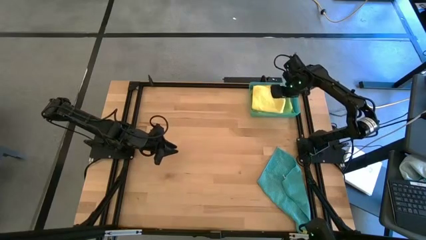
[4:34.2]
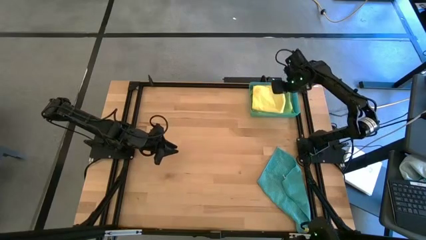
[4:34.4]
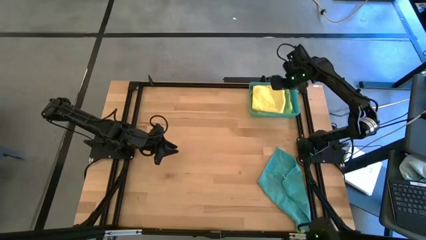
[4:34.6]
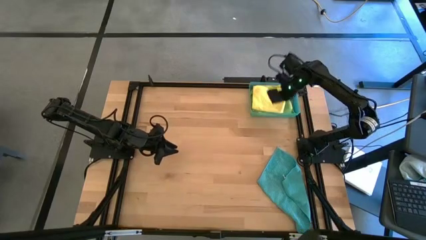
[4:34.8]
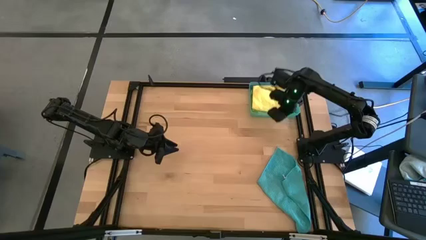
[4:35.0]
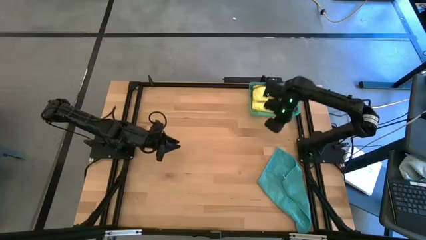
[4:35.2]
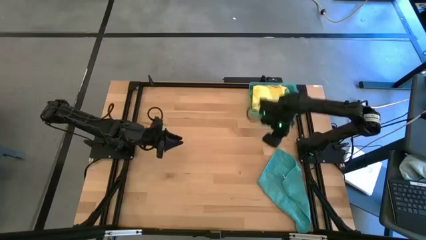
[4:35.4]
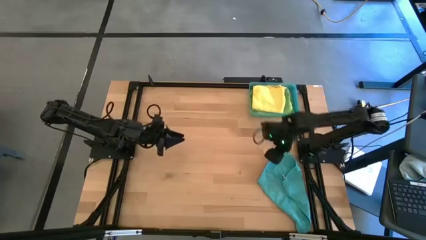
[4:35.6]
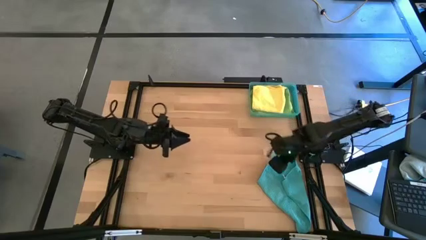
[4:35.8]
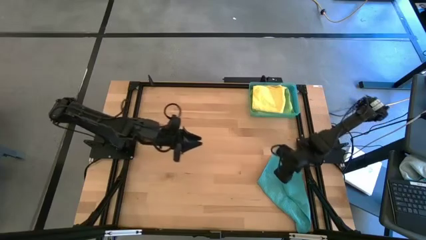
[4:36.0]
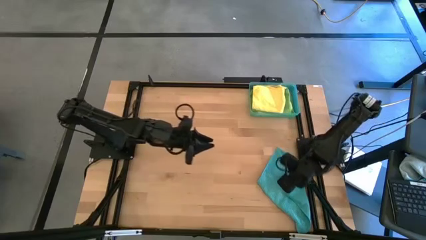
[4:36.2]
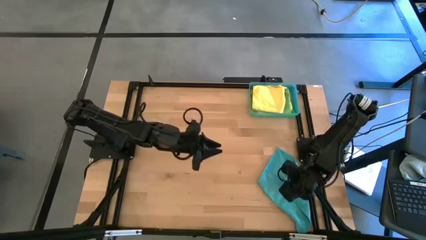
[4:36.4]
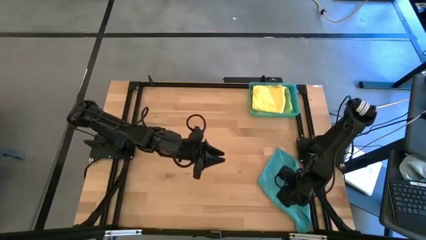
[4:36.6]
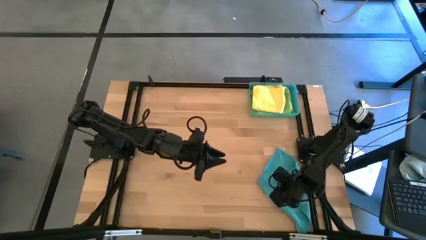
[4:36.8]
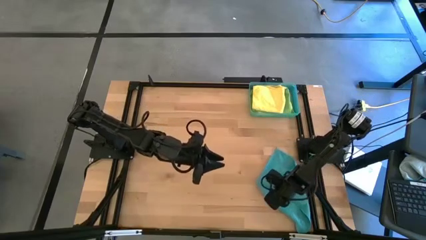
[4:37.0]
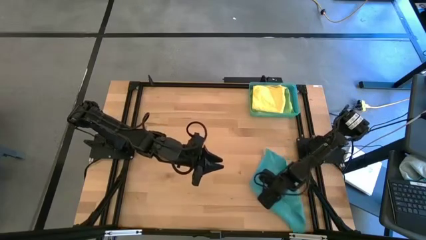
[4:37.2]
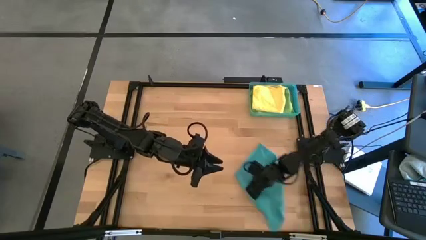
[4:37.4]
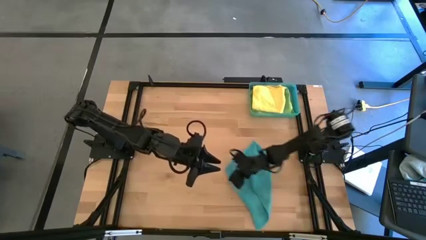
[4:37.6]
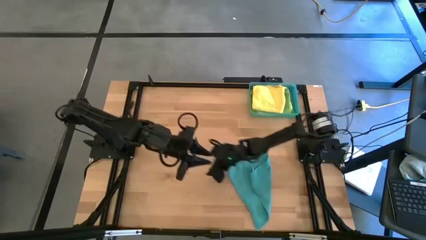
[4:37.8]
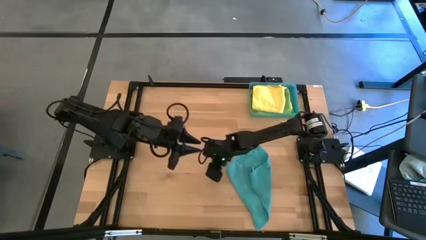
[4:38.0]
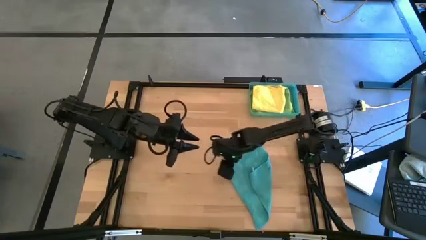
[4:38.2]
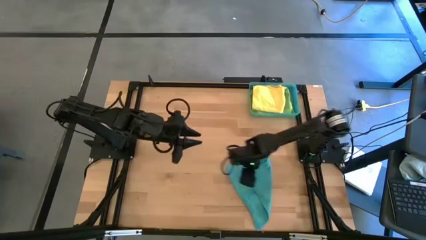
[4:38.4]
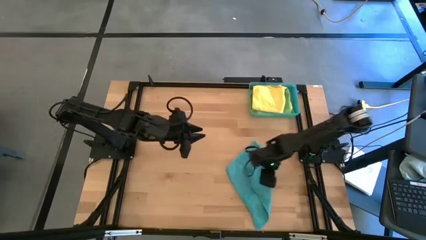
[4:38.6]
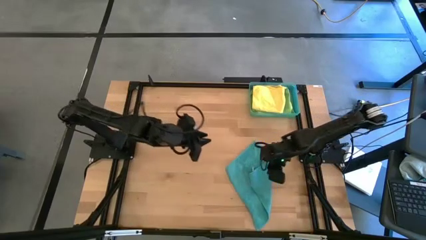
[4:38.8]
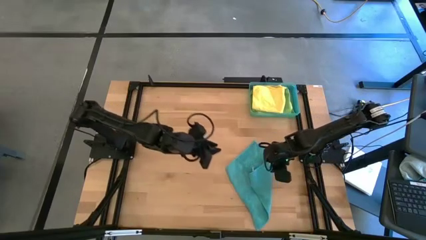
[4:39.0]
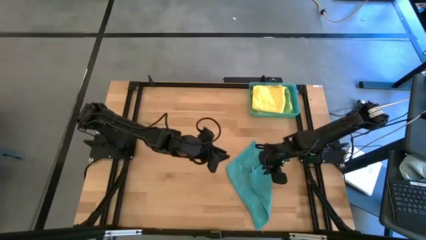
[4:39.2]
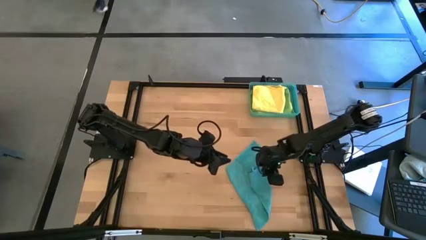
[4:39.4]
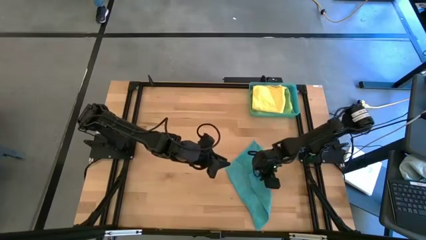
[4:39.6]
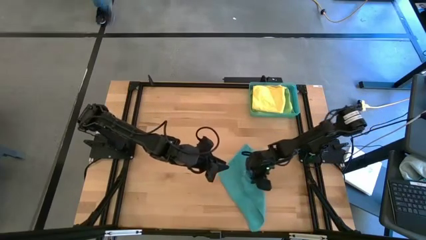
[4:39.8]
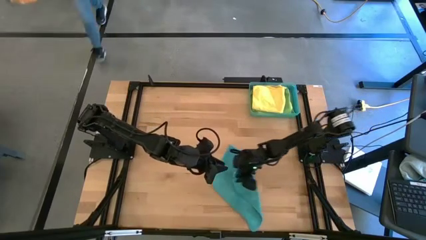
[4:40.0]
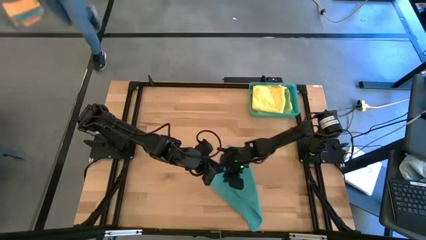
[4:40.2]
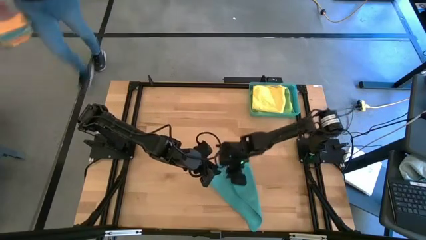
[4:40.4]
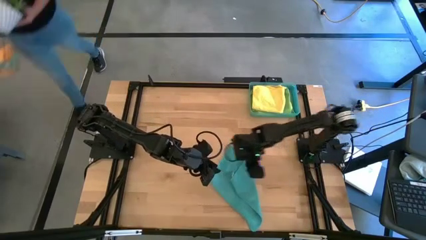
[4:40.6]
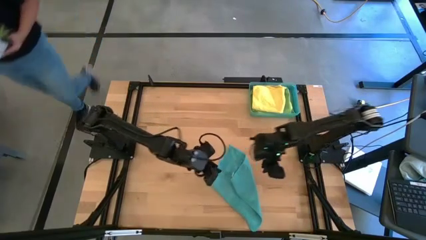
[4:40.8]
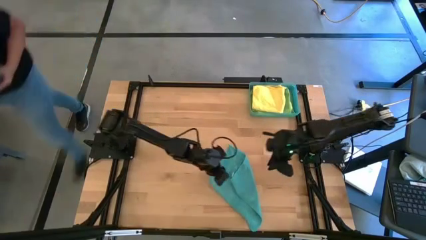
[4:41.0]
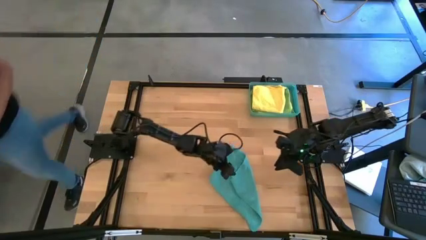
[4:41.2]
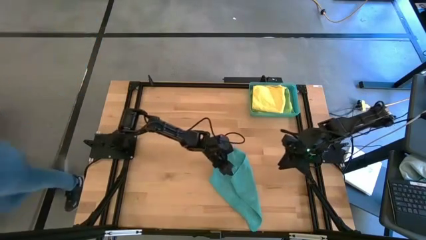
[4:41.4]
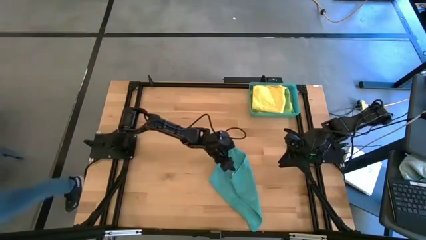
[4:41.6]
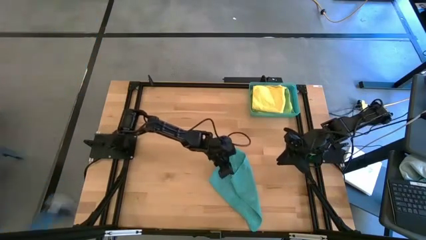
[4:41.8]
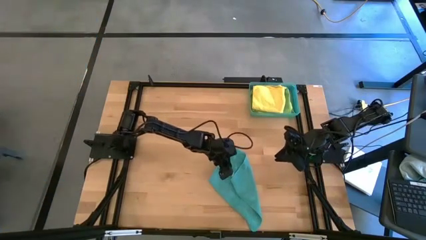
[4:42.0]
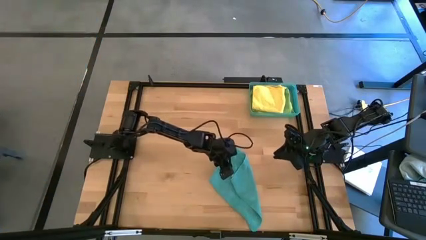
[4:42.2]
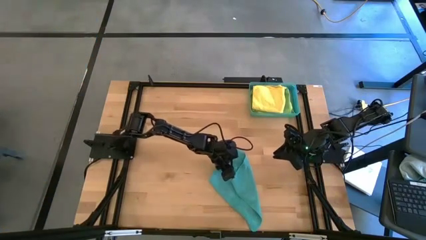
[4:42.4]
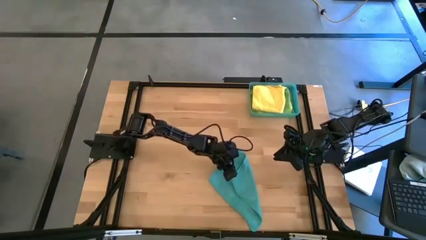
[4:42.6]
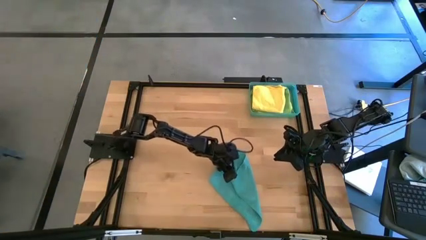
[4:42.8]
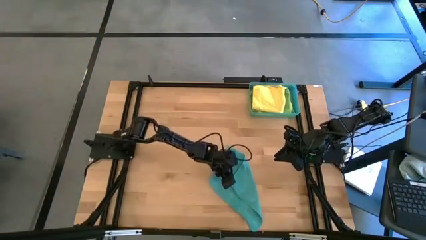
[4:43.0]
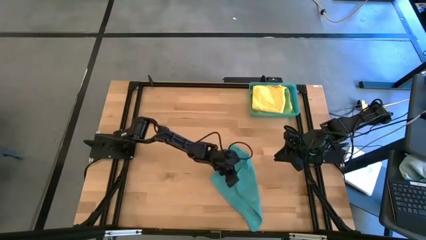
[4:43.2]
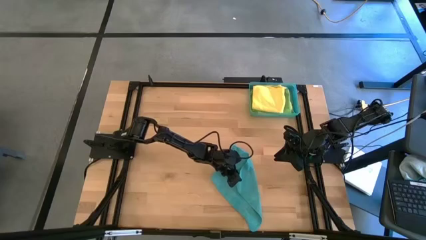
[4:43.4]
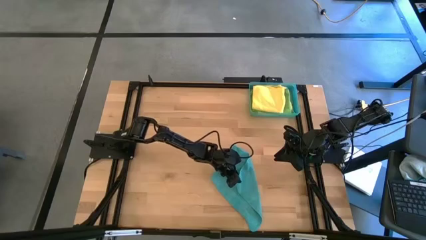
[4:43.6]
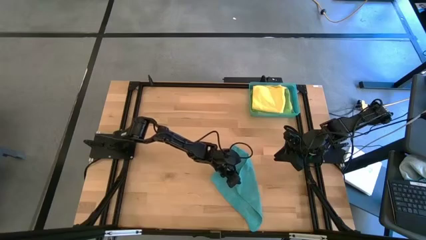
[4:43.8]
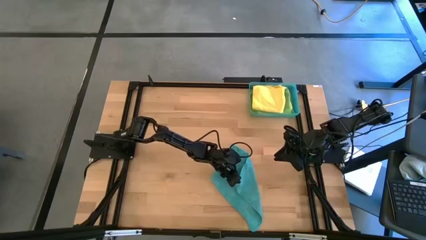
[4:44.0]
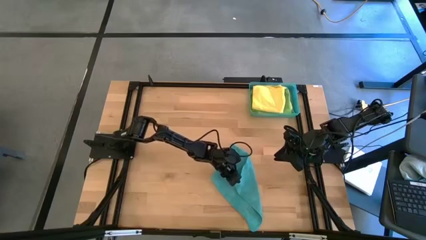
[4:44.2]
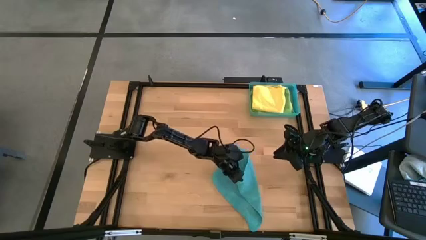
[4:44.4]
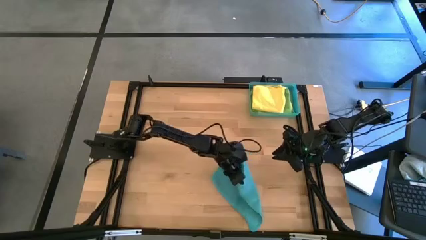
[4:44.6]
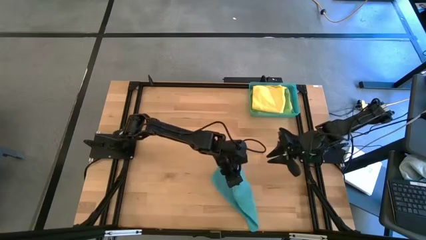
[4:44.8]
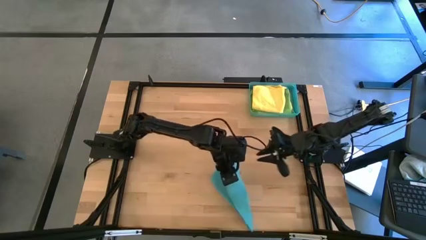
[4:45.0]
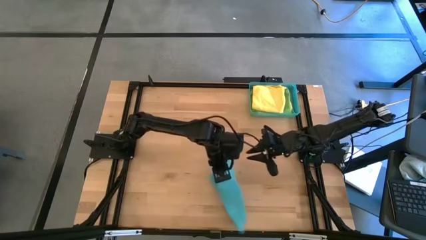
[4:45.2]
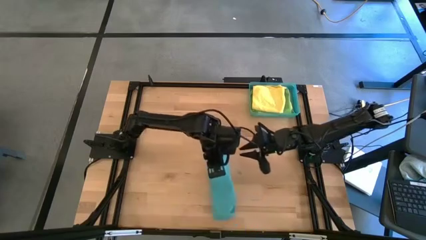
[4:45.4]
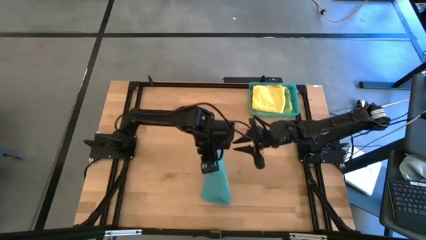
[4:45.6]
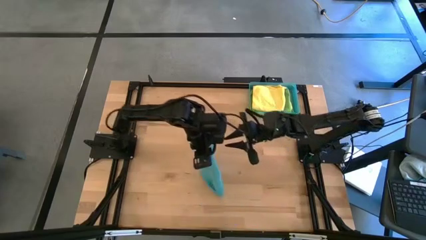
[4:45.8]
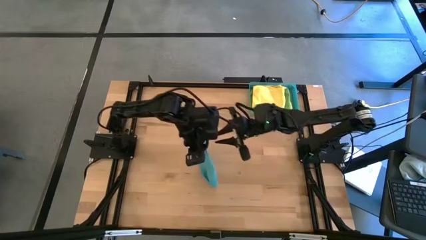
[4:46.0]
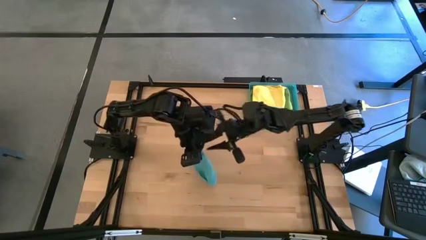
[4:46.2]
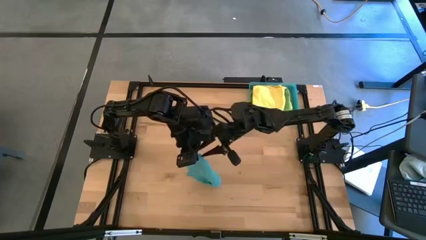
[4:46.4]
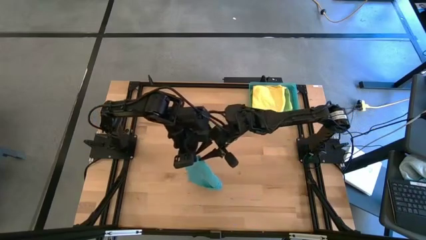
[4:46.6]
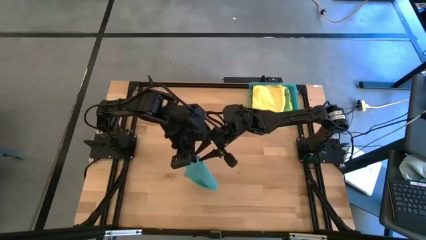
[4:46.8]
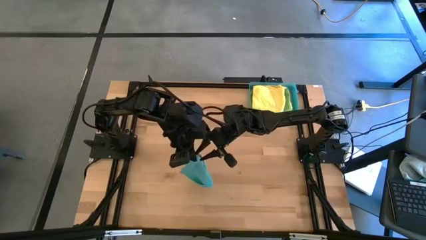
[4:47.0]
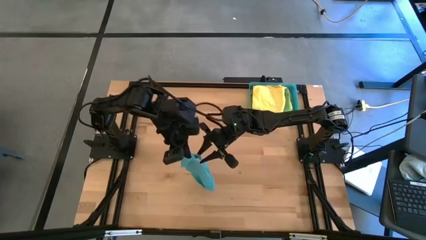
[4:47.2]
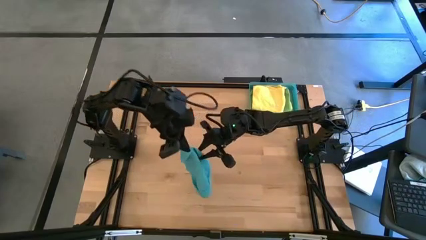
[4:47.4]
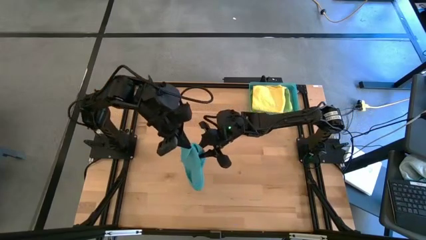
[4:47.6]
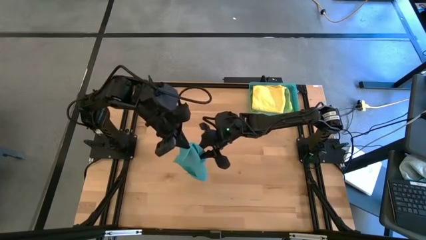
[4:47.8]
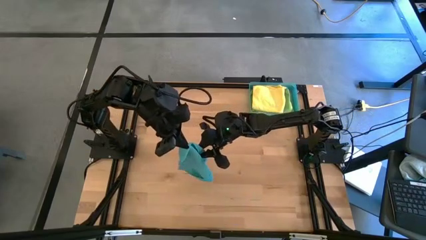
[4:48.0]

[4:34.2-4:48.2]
Task: Fold microfiber towels
Fold the blue microfiber cloth
